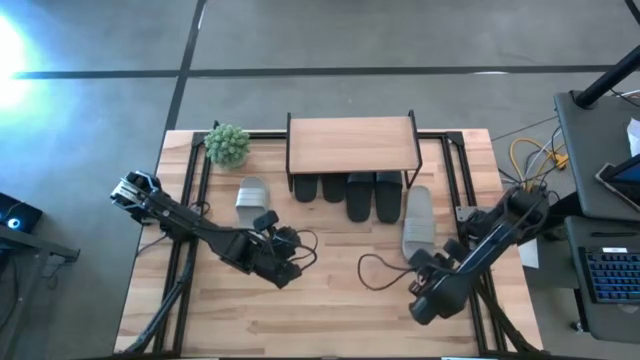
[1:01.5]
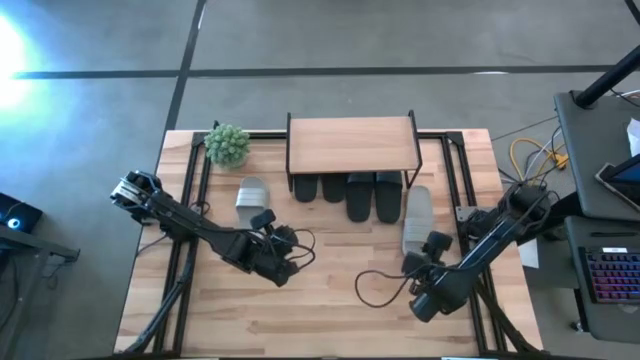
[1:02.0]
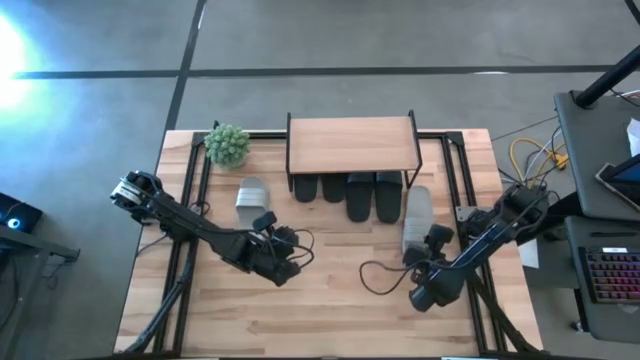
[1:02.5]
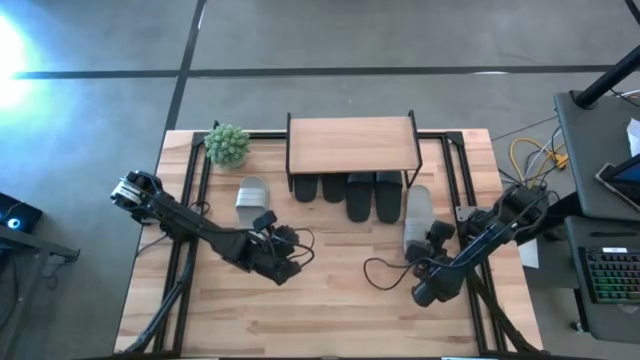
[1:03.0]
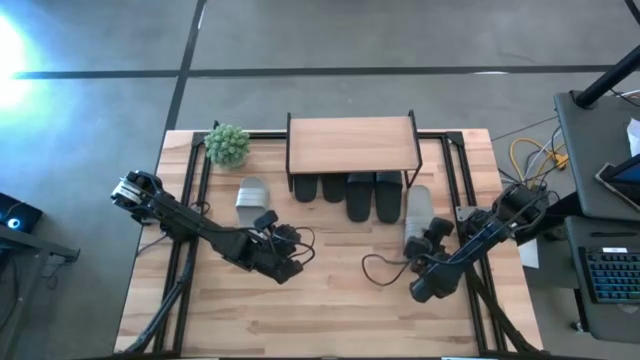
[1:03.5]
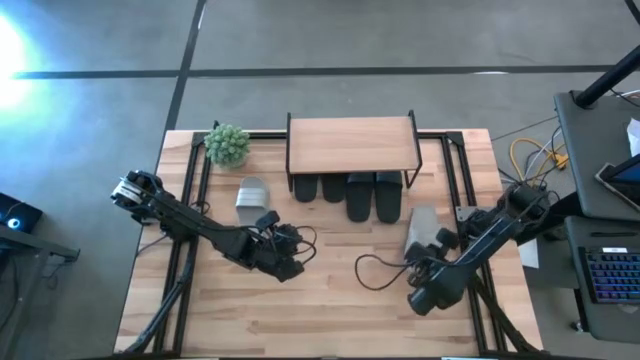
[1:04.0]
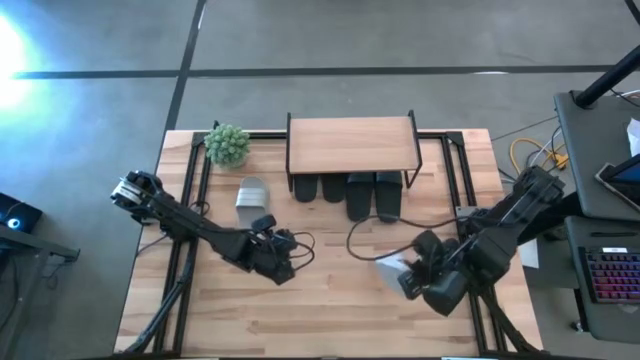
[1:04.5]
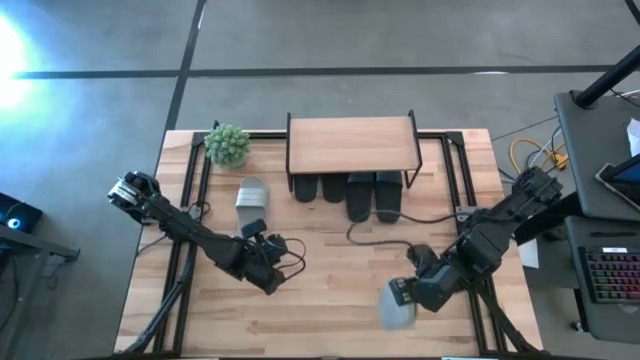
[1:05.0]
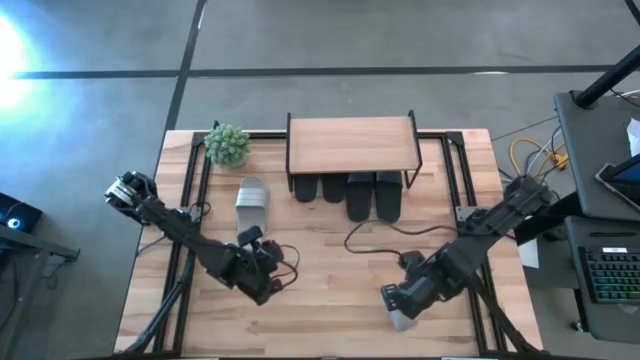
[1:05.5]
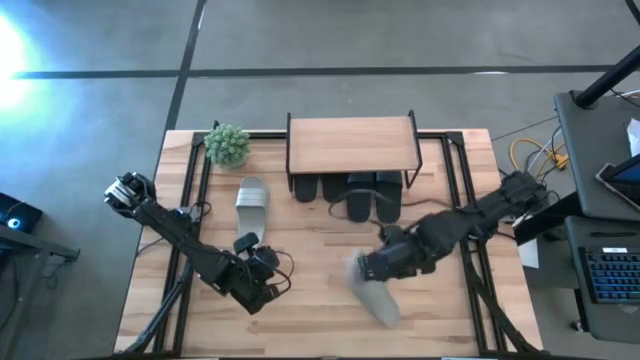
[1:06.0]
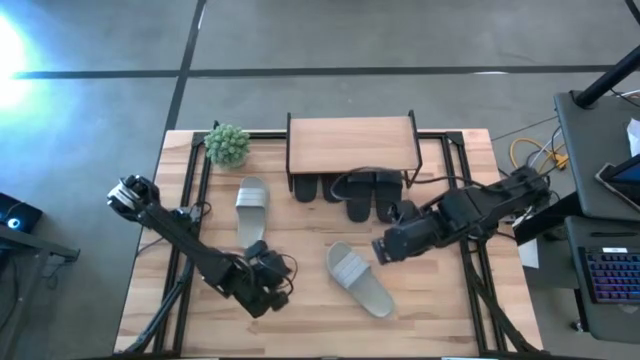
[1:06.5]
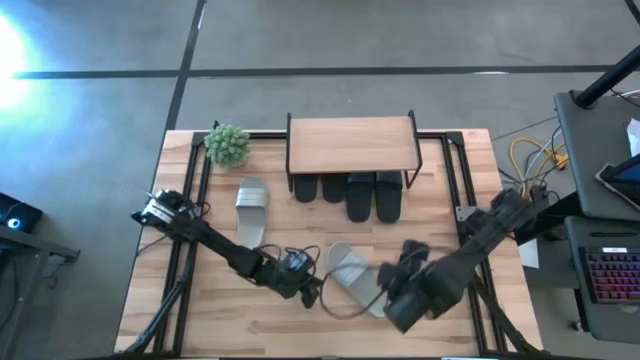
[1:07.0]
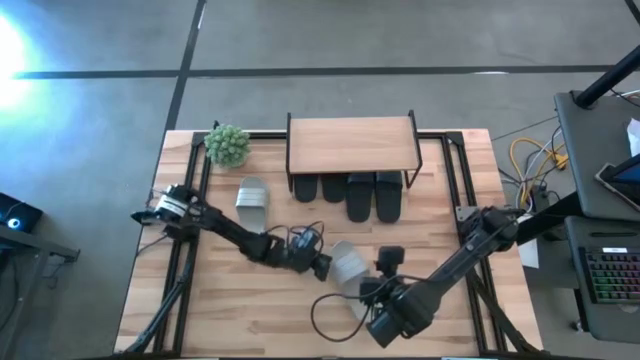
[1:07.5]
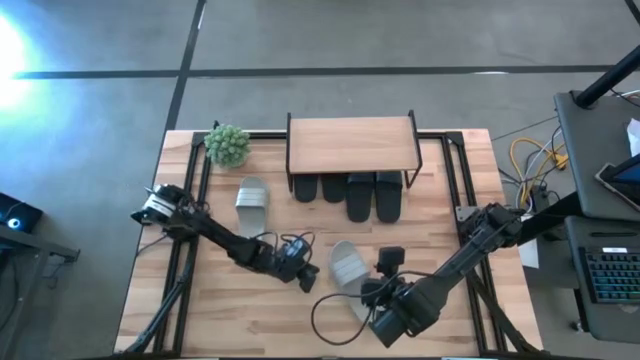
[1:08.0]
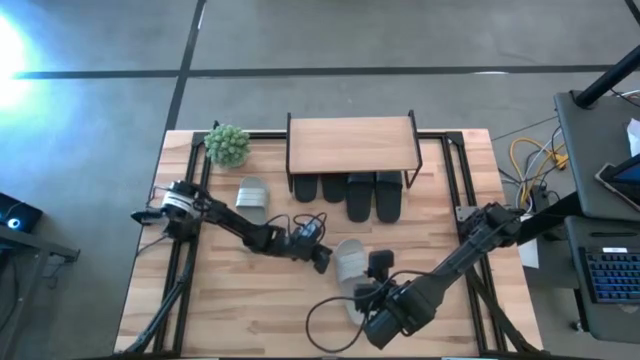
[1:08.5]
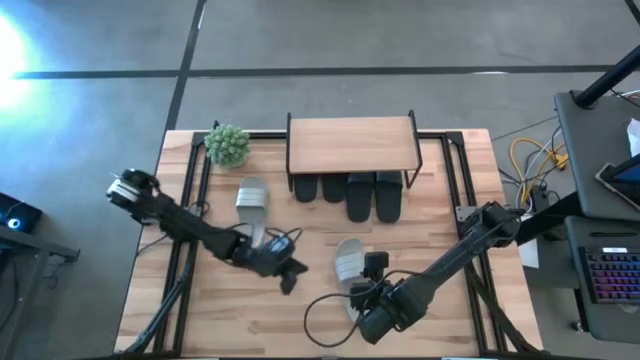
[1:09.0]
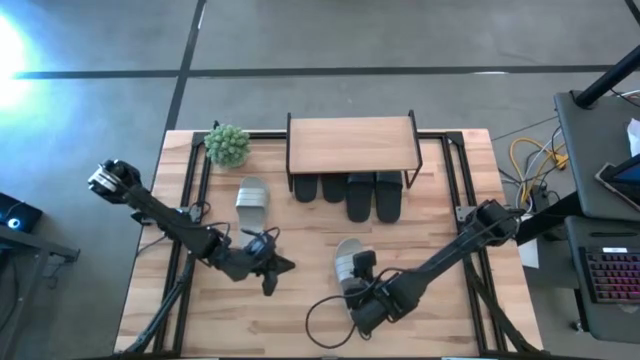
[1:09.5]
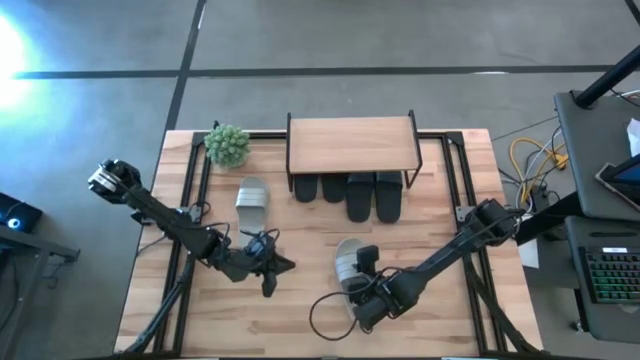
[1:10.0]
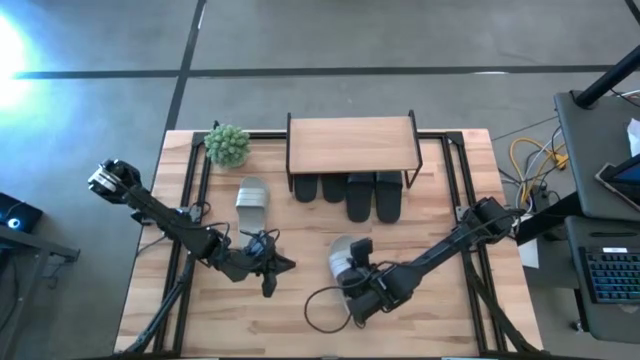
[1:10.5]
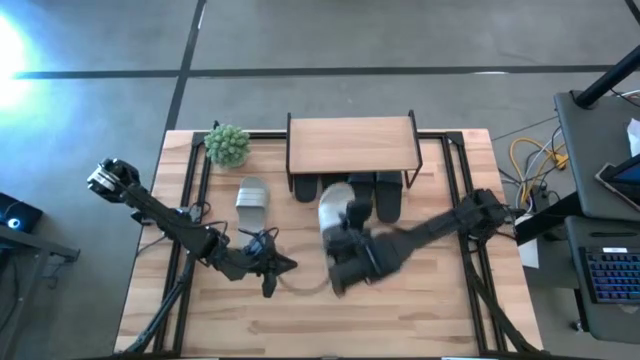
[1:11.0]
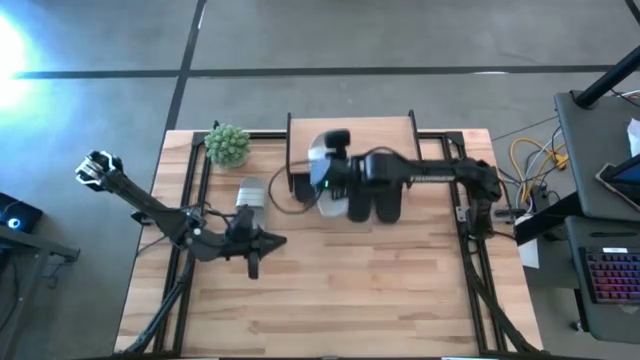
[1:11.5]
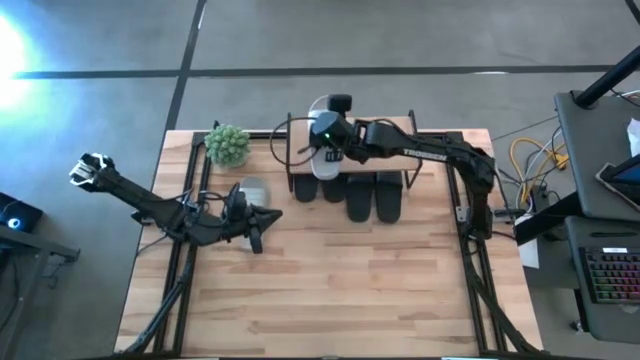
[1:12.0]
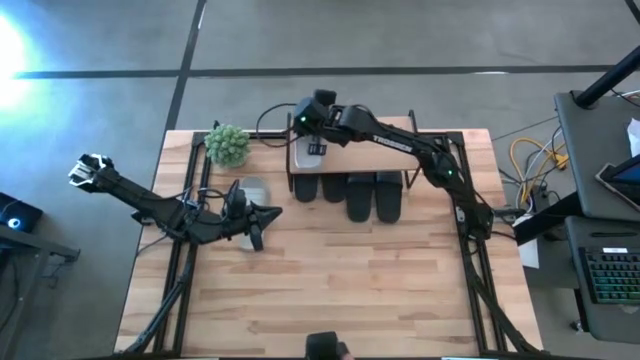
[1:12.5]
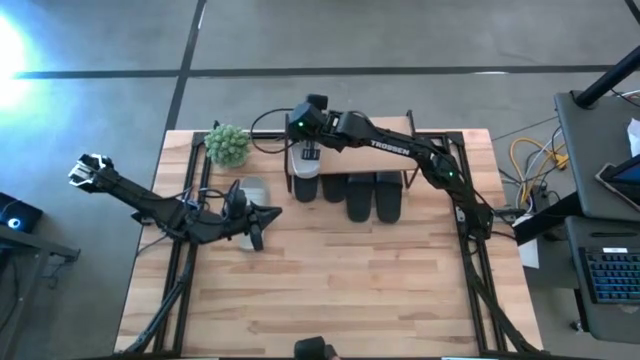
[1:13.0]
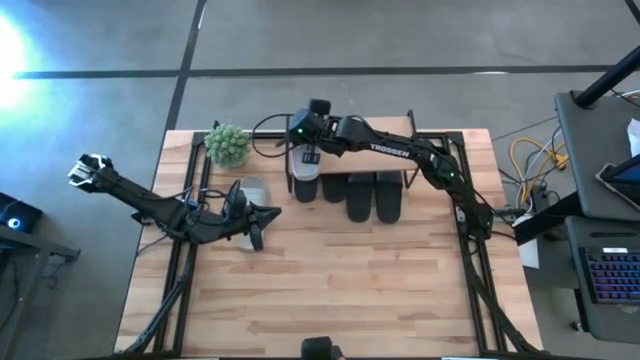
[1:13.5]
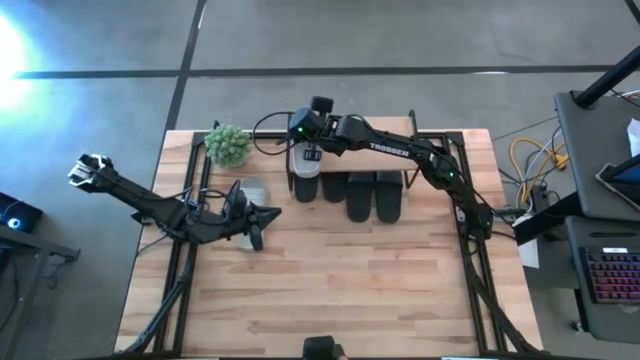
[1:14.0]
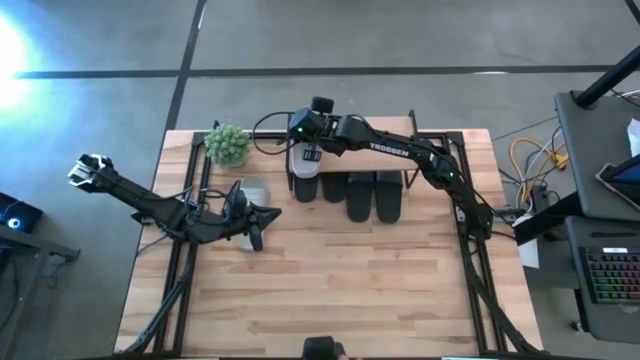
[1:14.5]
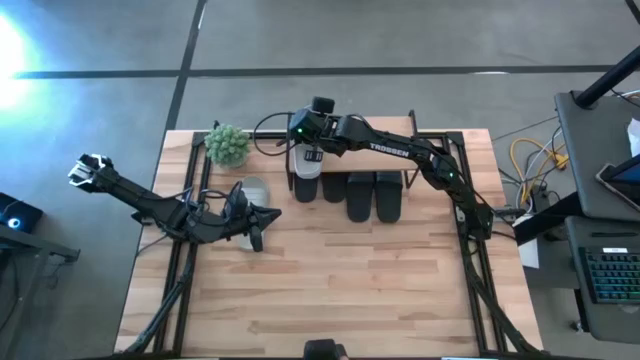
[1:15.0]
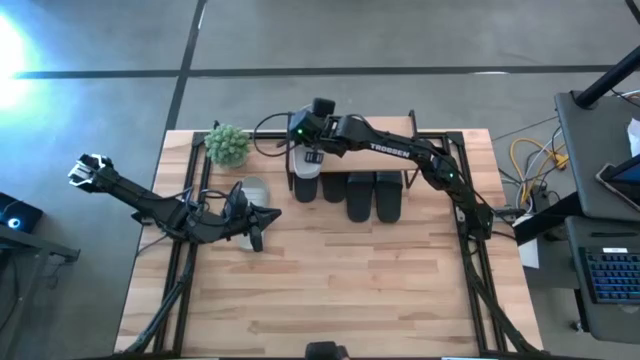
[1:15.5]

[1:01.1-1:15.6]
Task: Pick and place slides into the shelf
Put the white slide on the shelf

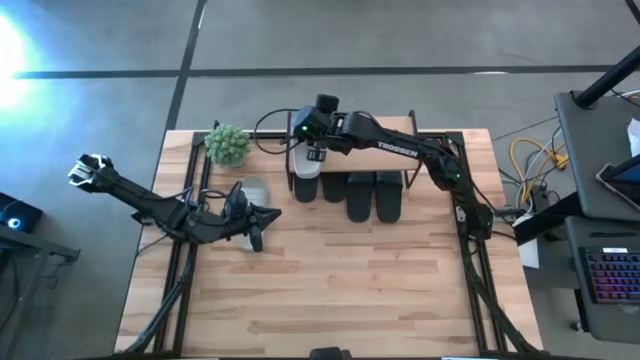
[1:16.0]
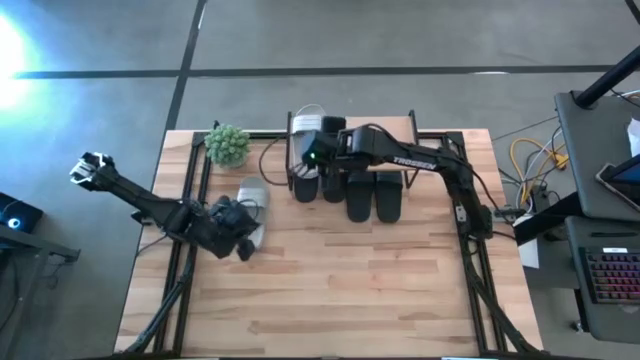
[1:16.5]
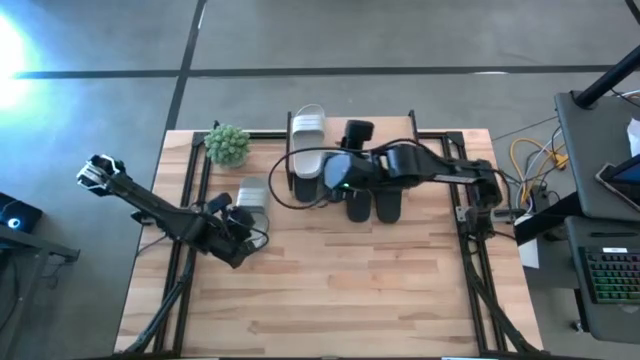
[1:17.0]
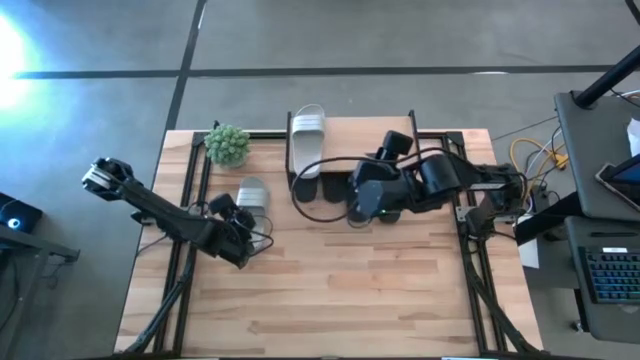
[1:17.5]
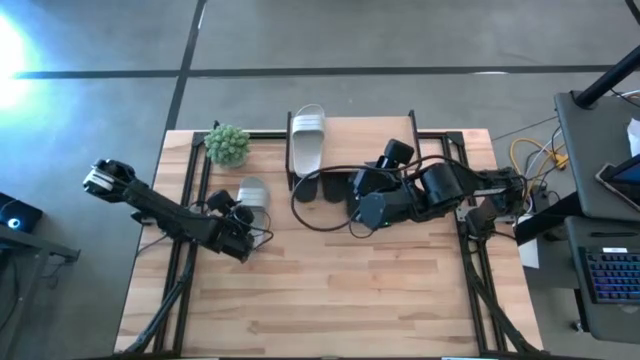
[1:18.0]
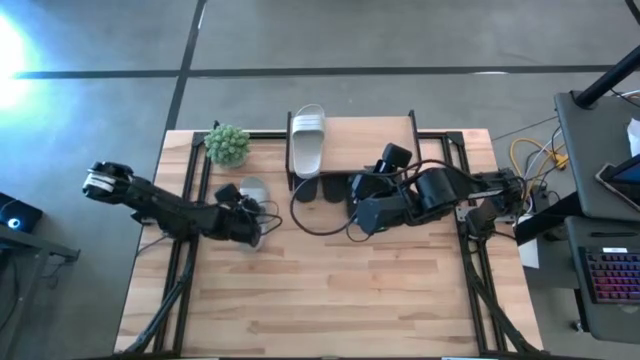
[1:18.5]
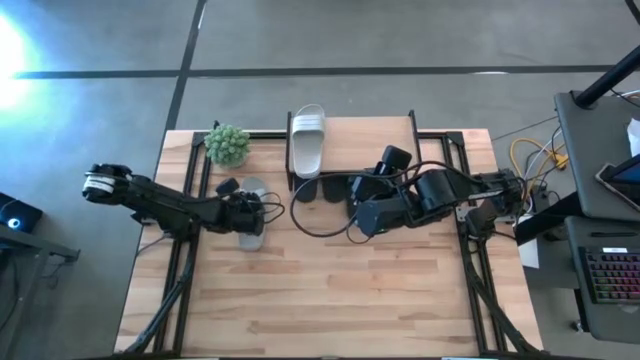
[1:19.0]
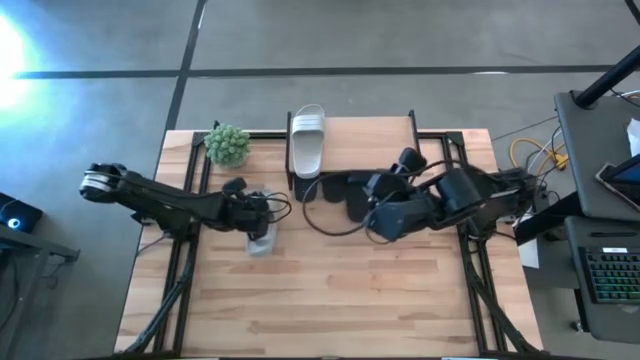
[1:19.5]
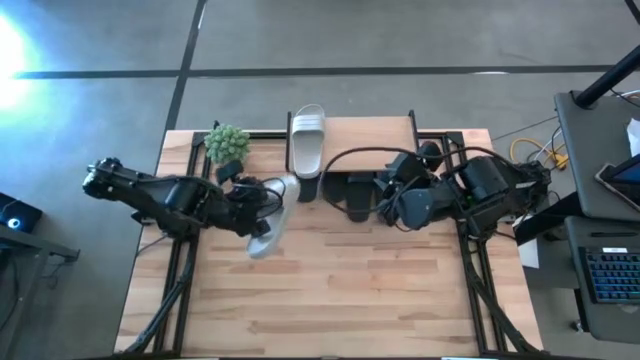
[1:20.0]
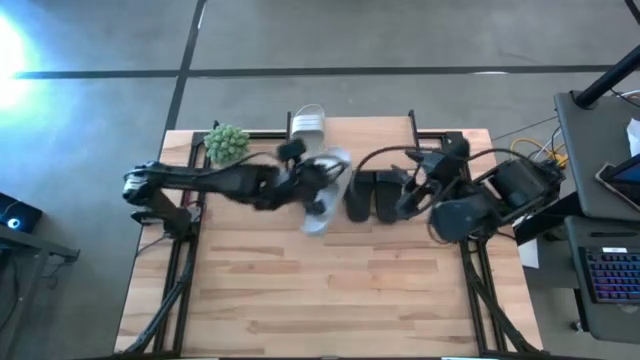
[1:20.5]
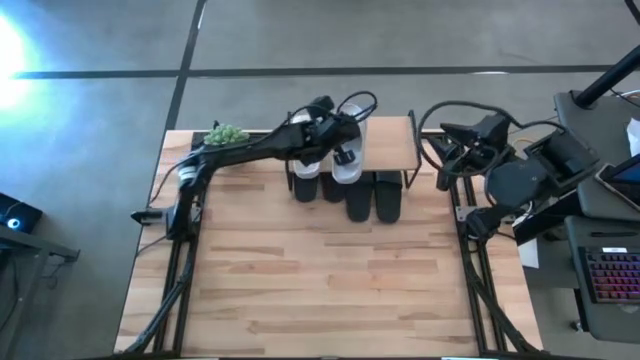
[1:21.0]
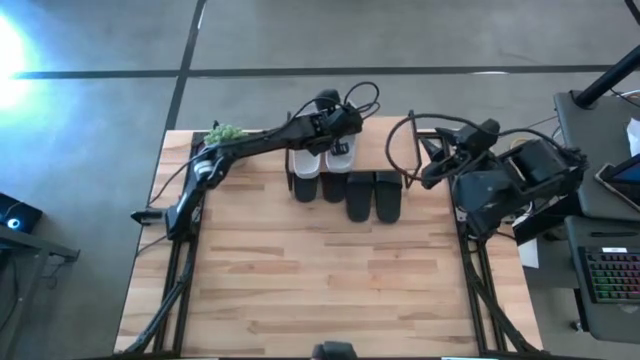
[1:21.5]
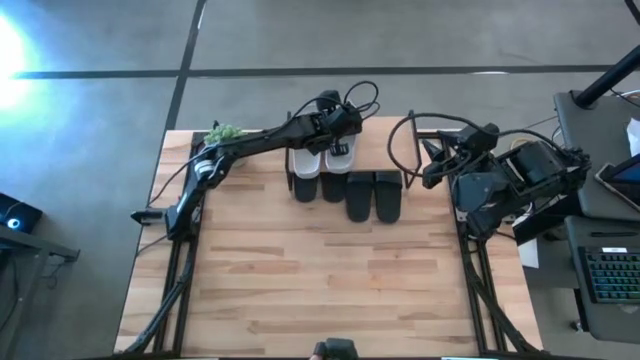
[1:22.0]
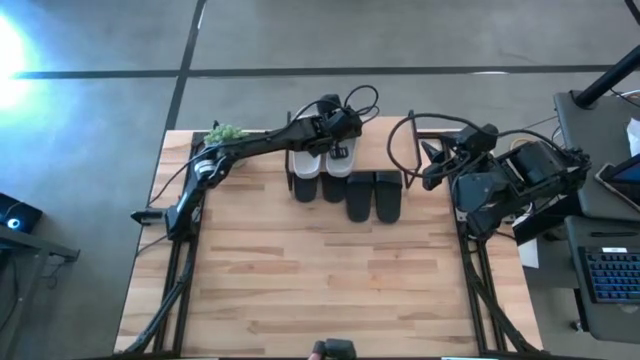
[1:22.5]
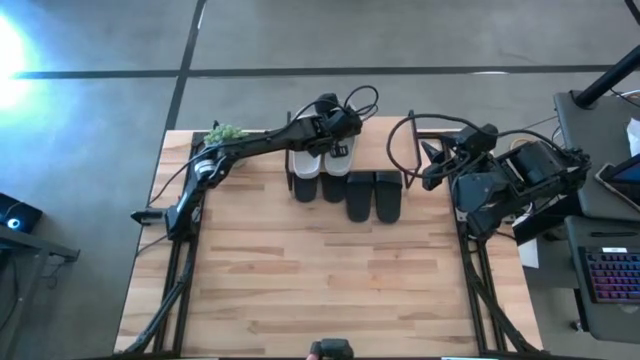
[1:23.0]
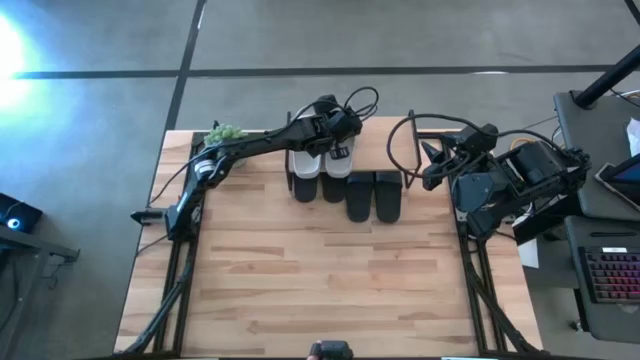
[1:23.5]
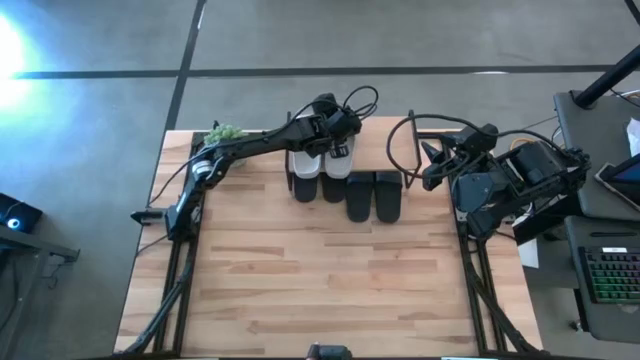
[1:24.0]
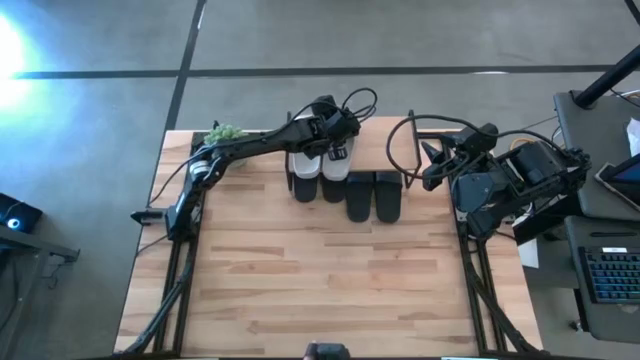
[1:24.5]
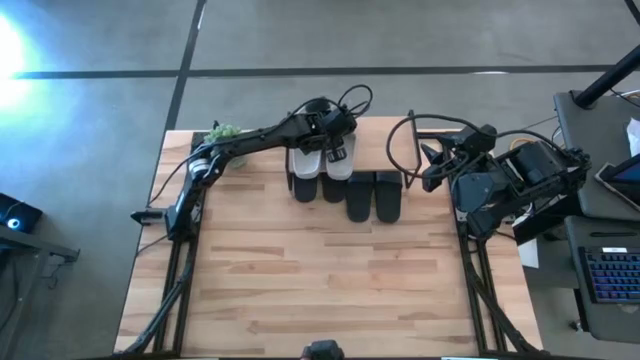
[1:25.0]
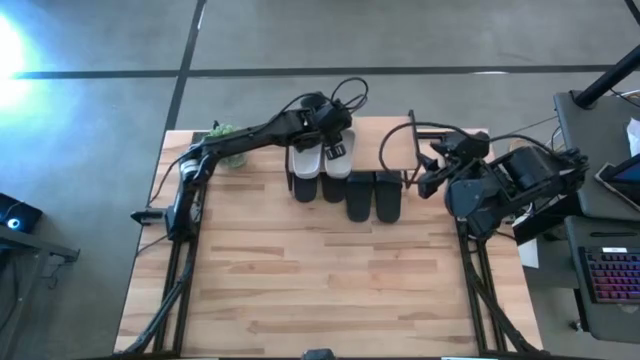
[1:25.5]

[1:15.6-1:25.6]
Put the white slide on the shelf
